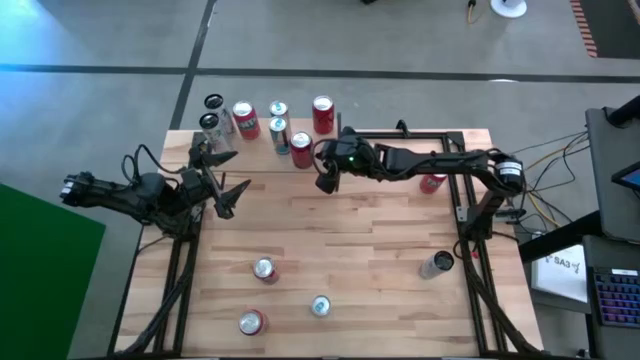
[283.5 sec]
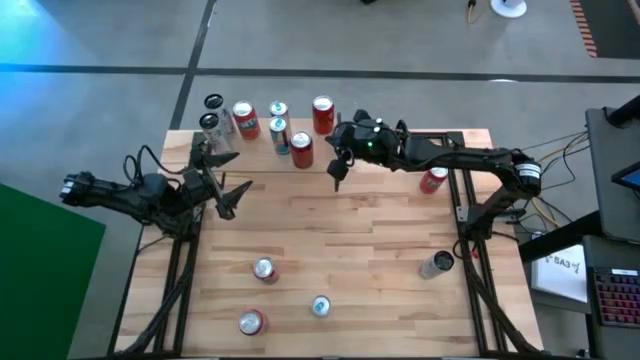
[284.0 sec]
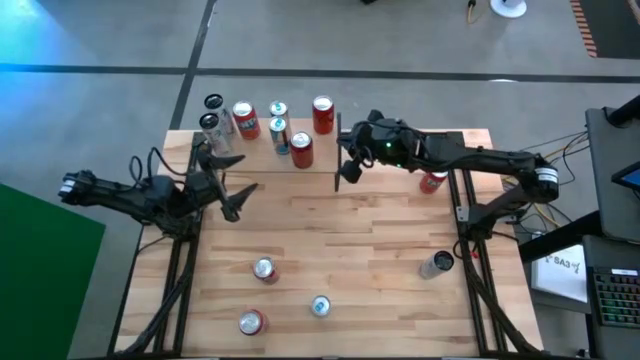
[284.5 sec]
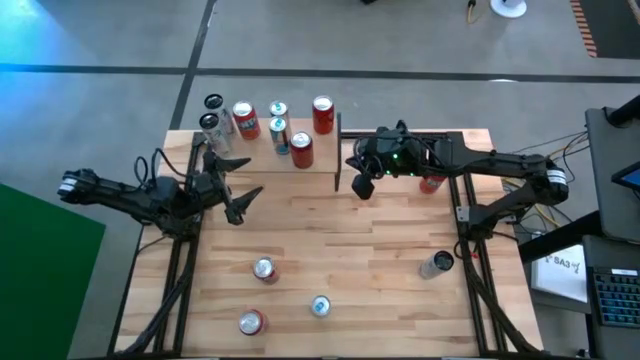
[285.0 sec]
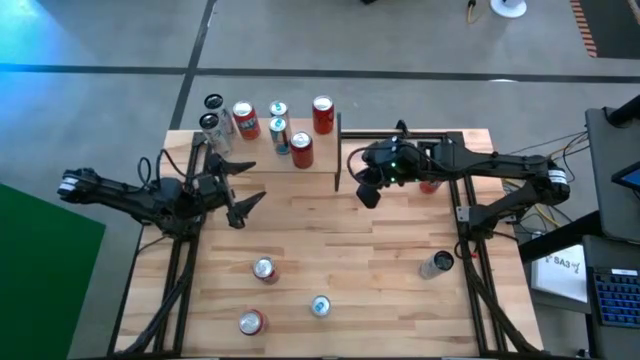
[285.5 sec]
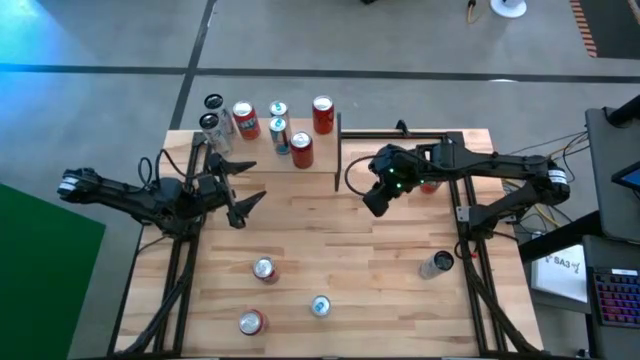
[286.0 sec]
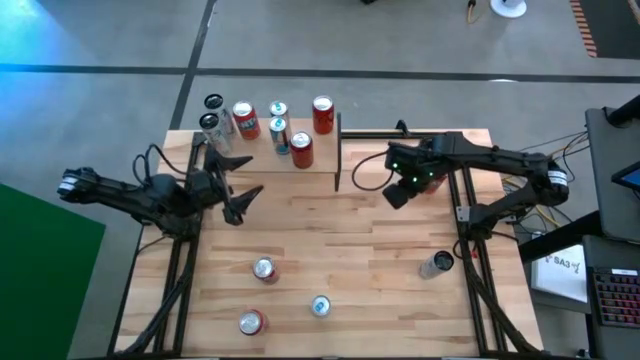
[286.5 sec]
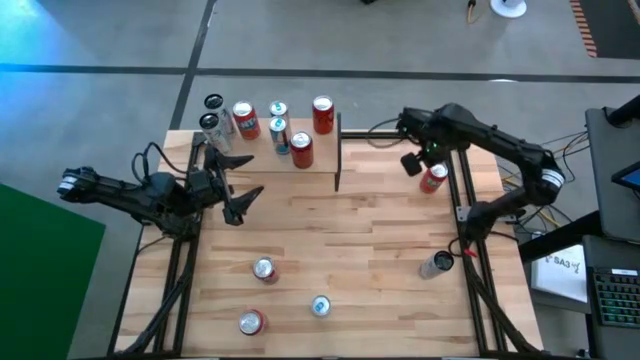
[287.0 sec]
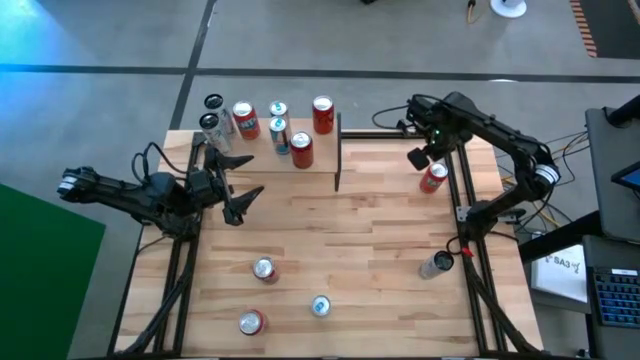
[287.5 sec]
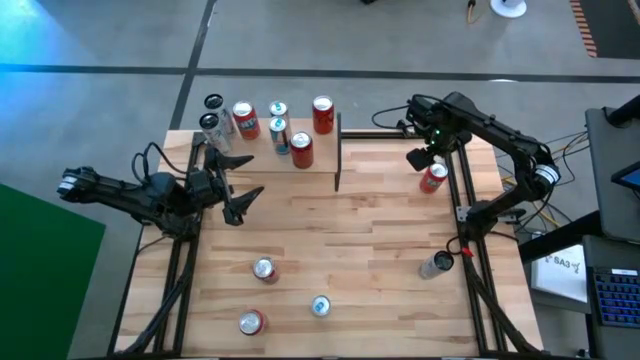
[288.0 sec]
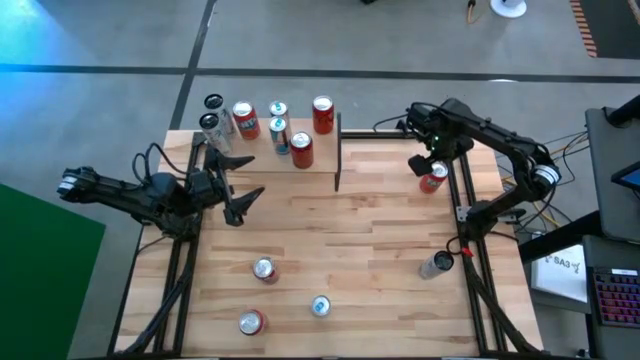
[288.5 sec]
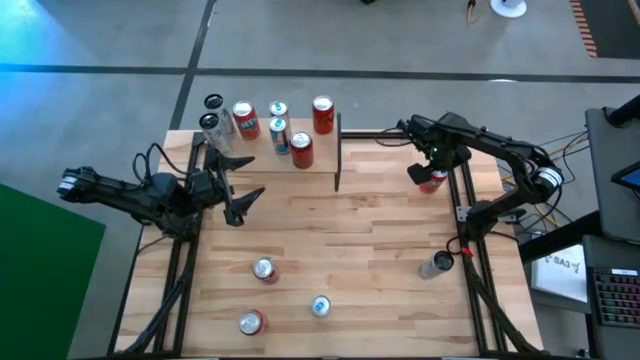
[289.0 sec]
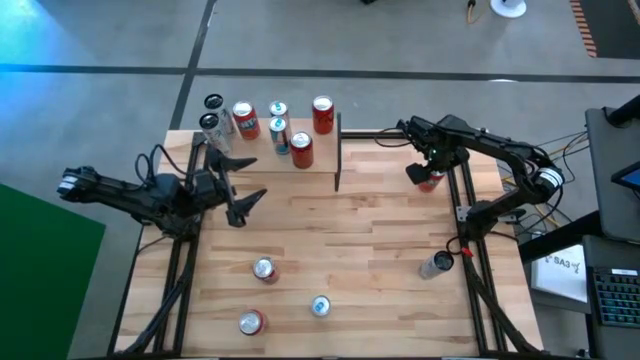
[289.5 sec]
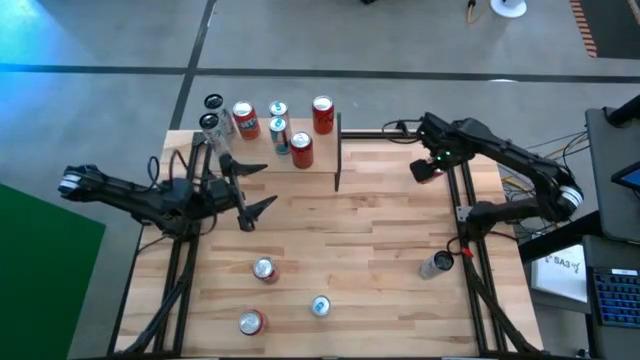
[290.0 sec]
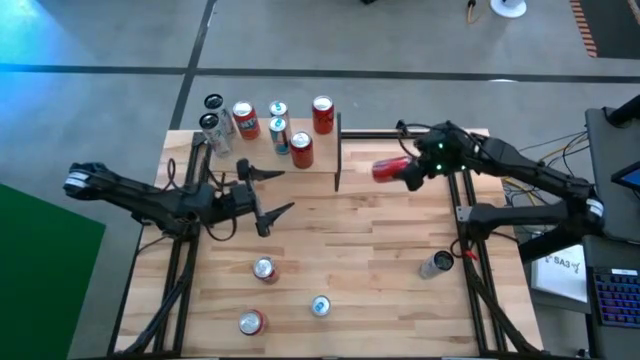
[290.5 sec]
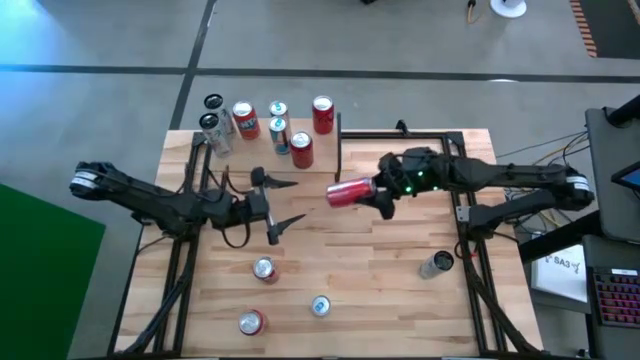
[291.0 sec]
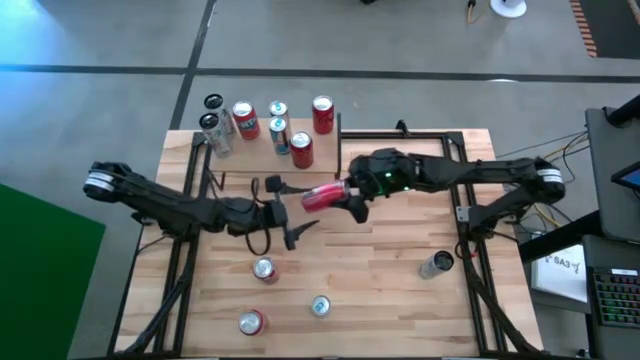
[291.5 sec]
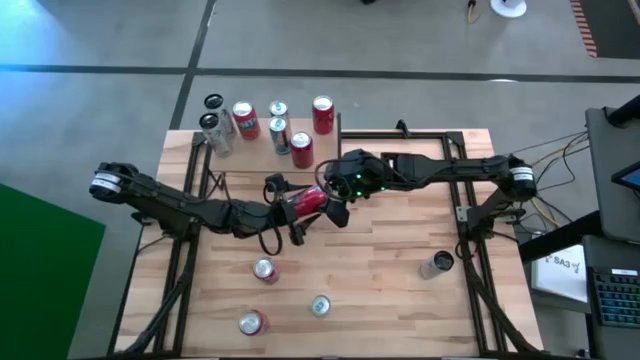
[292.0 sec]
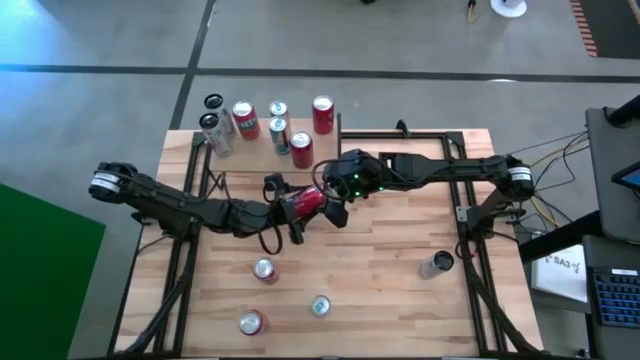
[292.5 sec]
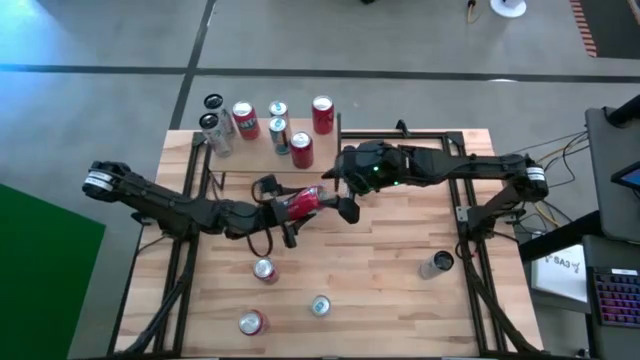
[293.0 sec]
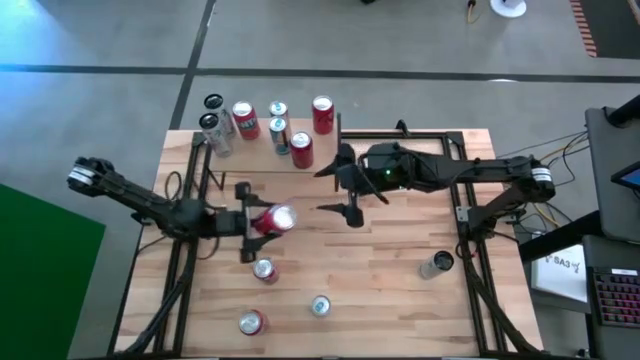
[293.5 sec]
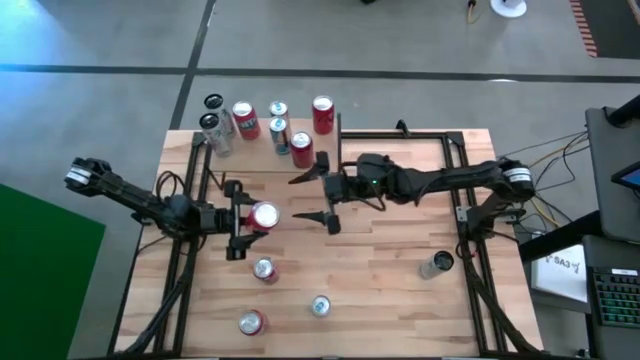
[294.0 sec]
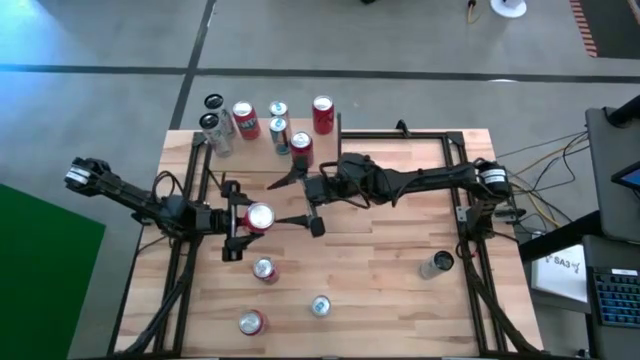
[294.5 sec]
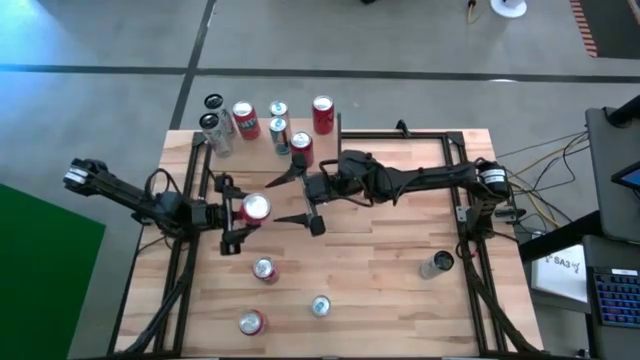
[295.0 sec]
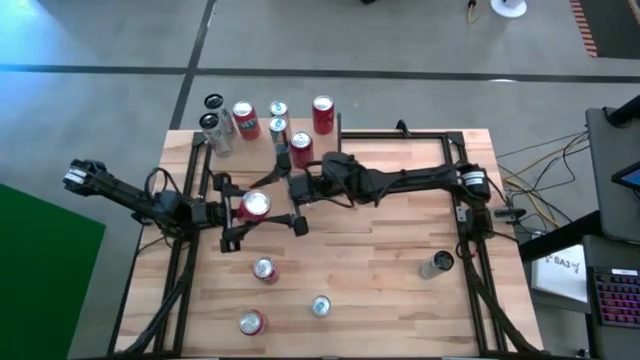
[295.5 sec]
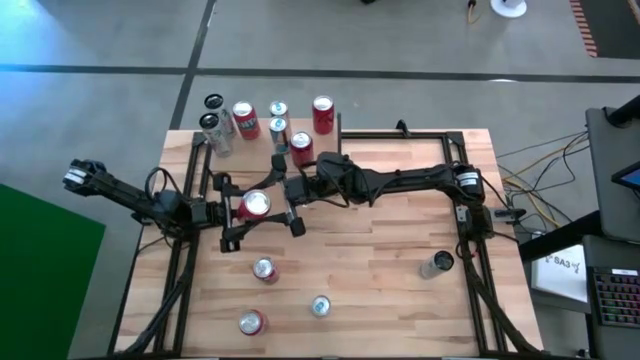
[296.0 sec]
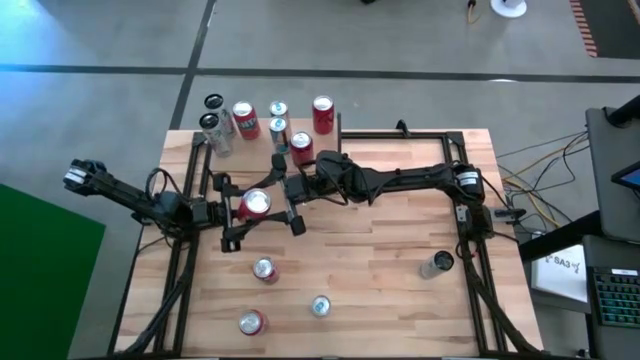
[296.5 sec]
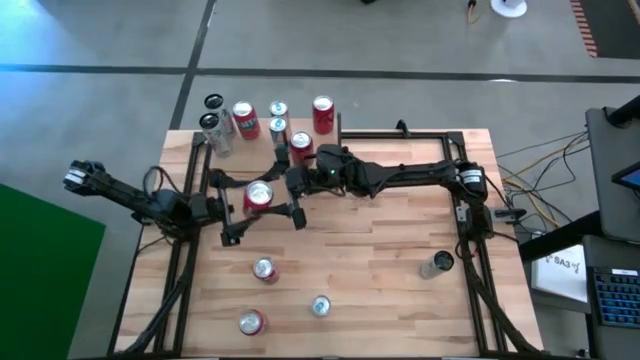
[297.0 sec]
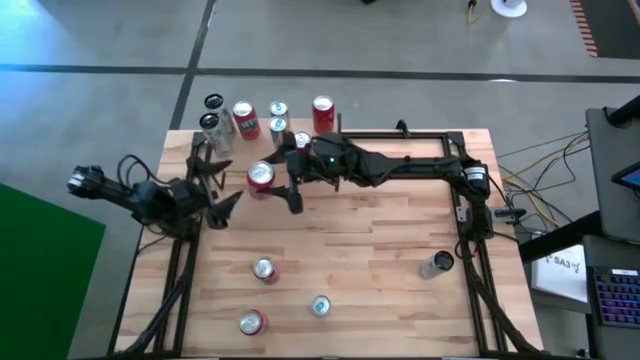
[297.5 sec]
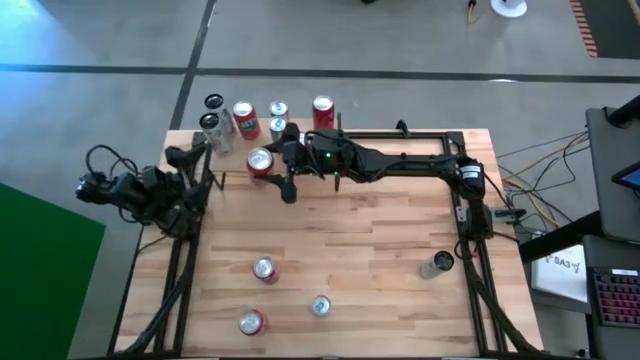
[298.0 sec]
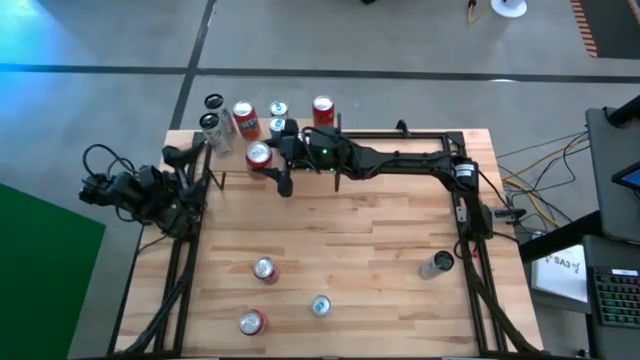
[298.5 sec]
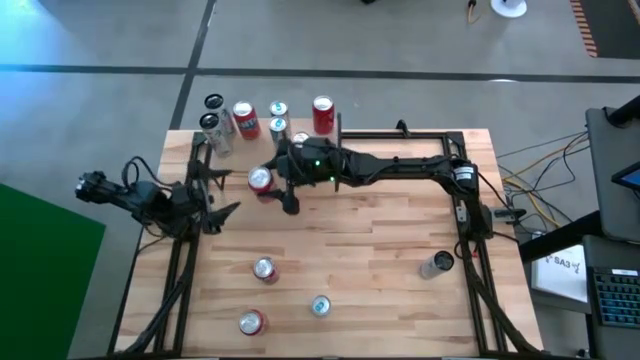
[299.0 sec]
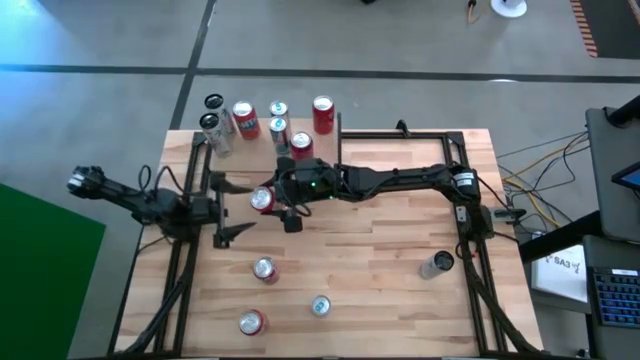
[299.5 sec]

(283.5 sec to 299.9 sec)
Task: Place canned beverage on shelf
Put the red soda can on the shelf aligned with the other red soda cans

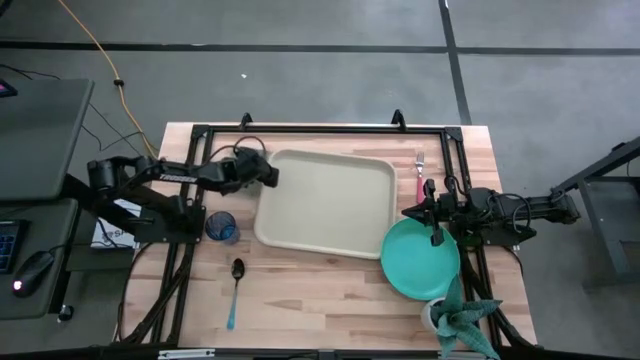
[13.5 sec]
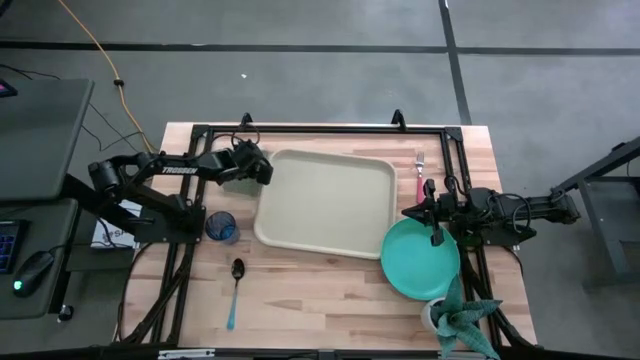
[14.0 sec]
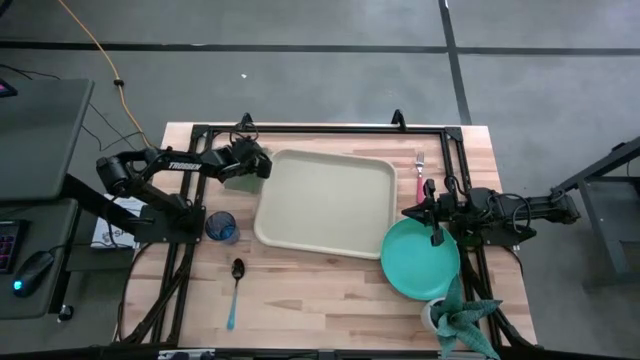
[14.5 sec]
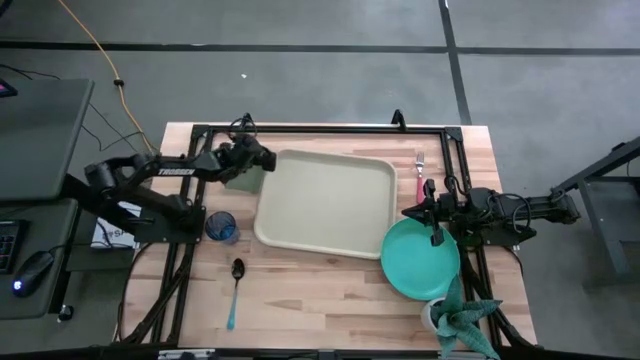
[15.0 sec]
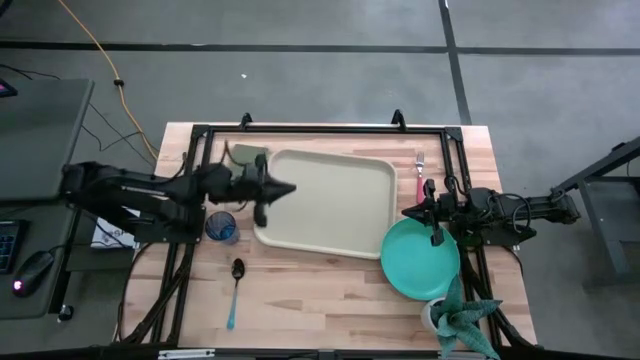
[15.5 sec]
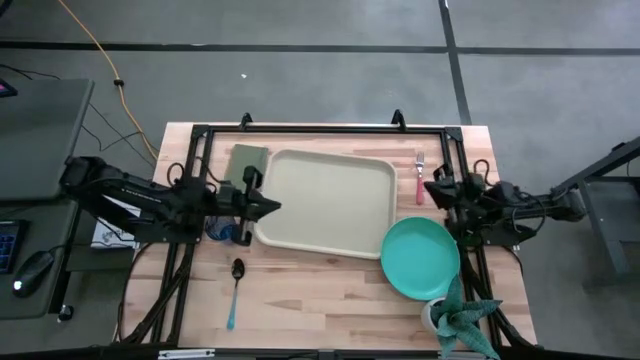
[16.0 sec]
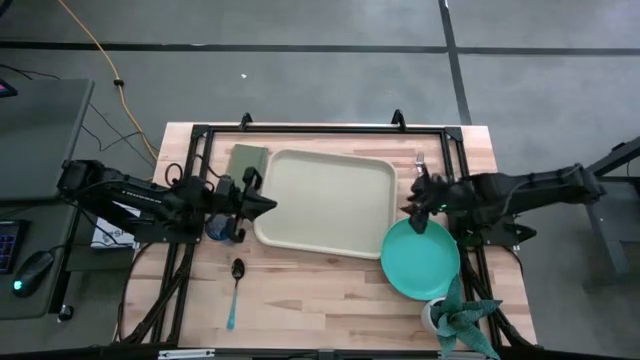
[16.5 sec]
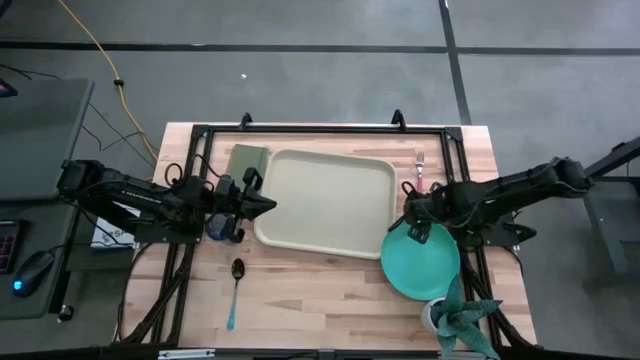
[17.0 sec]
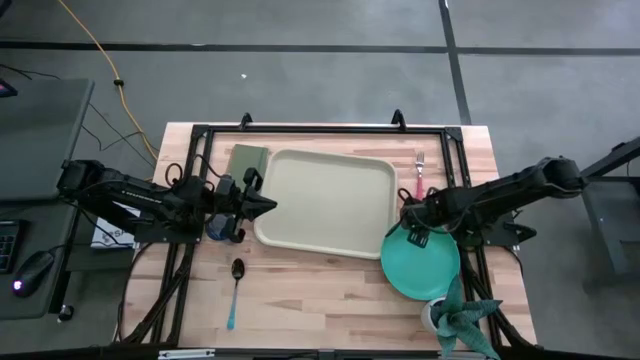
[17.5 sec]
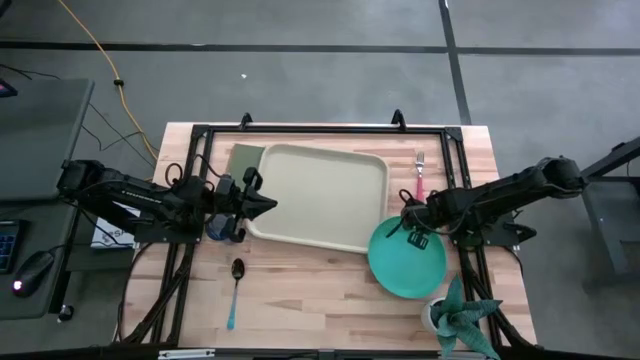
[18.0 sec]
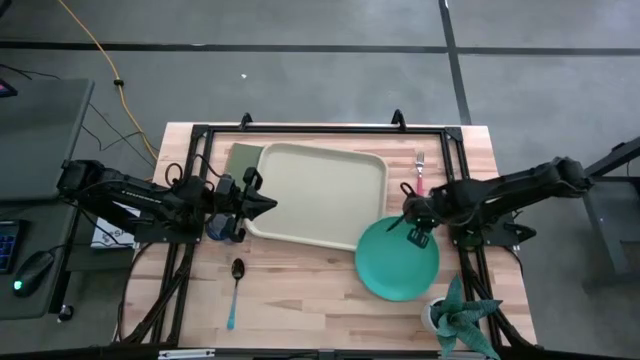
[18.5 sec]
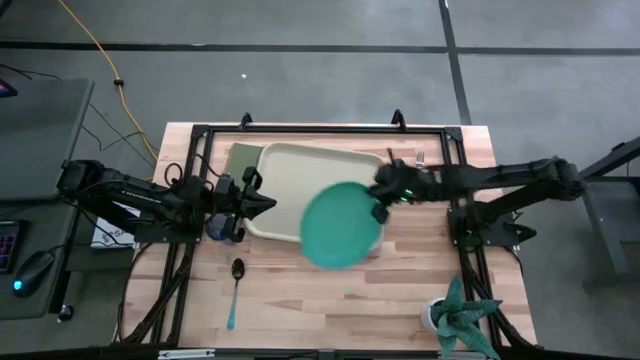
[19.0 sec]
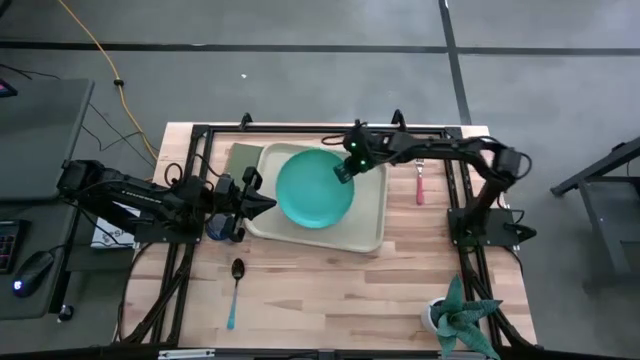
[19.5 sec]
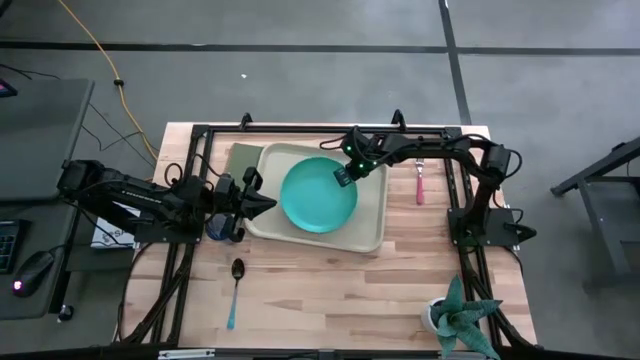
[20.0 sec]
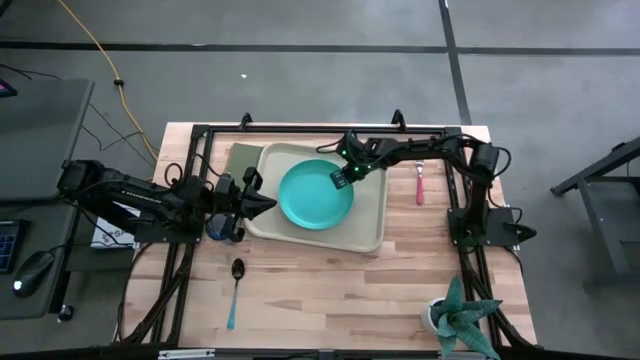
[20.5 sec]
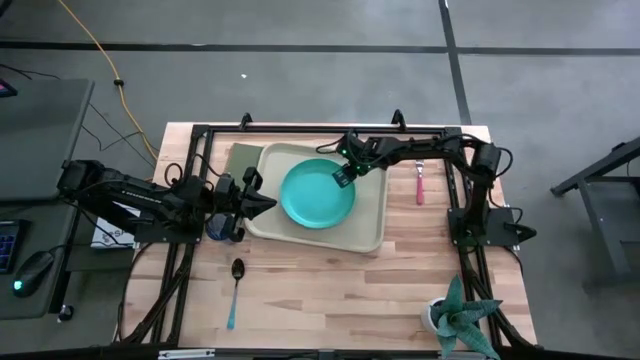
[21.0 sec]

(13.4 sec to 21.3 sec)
Task: Pick and place plate/cup/fork/spoon on tray
Put the green plate on the center of the gray tray
